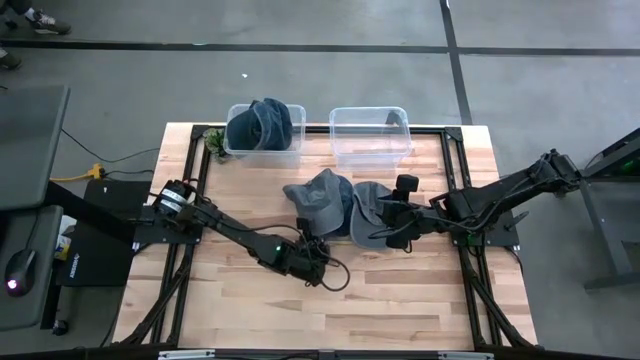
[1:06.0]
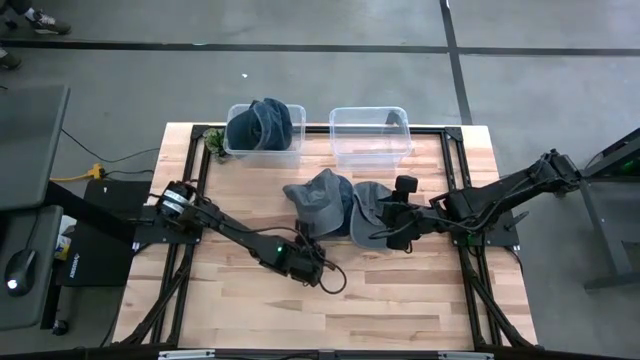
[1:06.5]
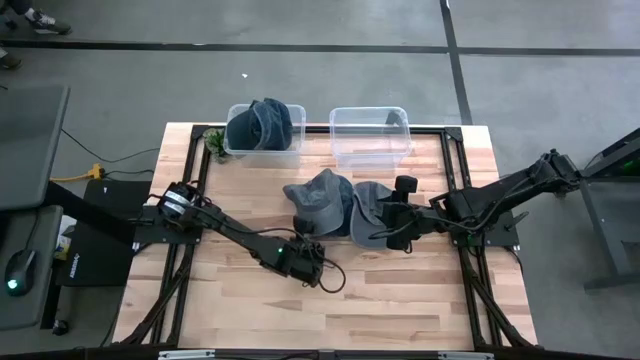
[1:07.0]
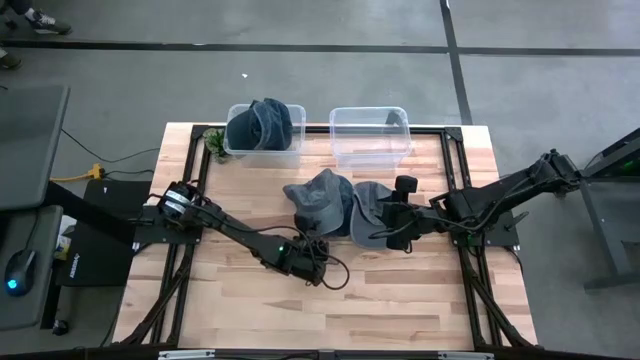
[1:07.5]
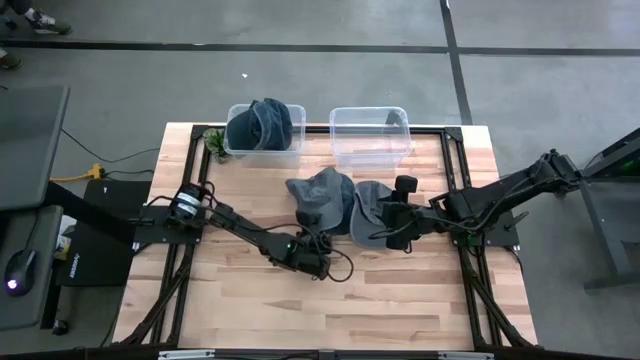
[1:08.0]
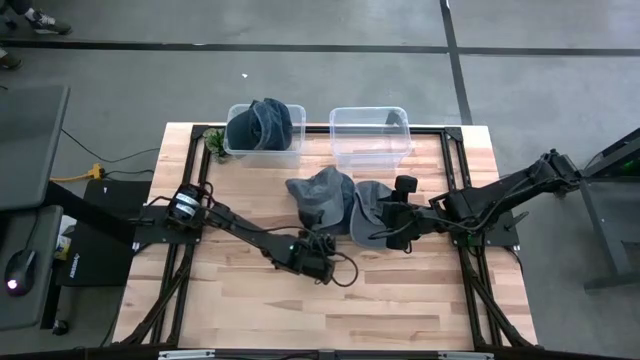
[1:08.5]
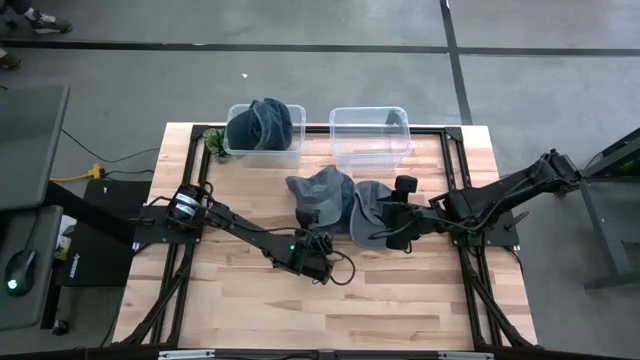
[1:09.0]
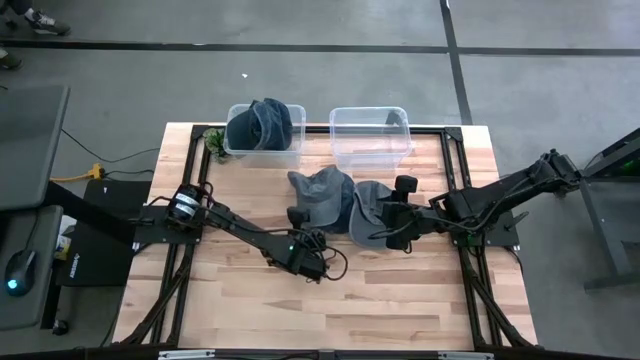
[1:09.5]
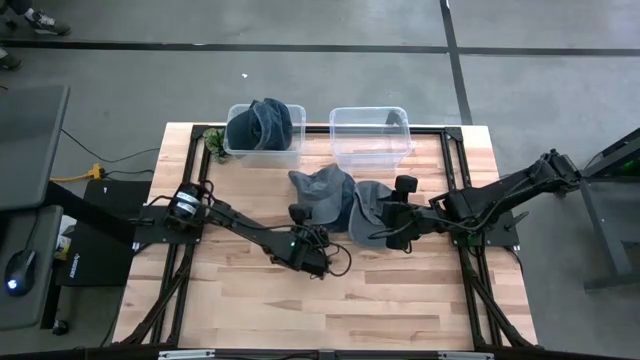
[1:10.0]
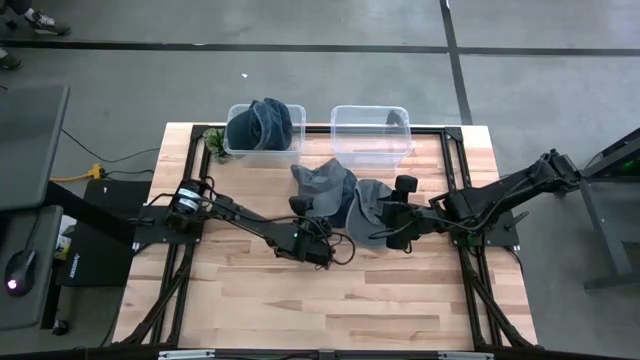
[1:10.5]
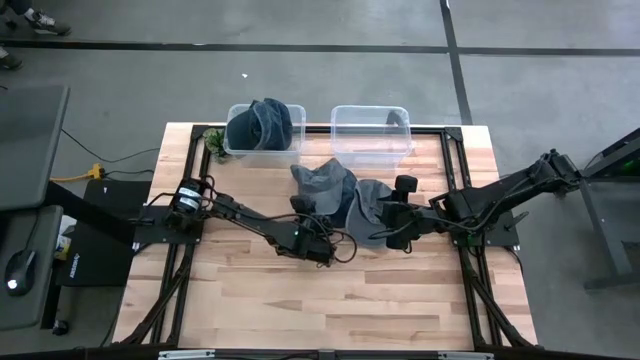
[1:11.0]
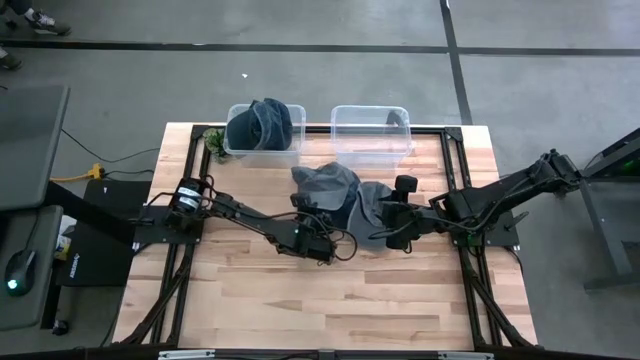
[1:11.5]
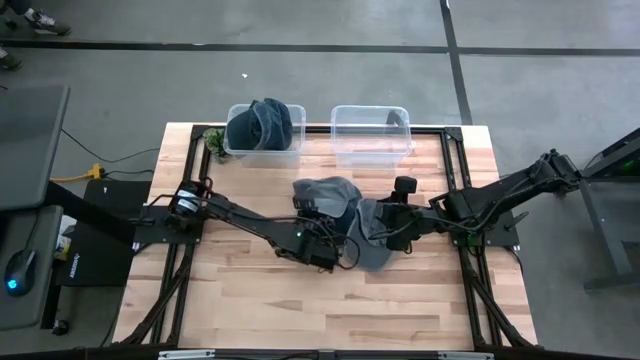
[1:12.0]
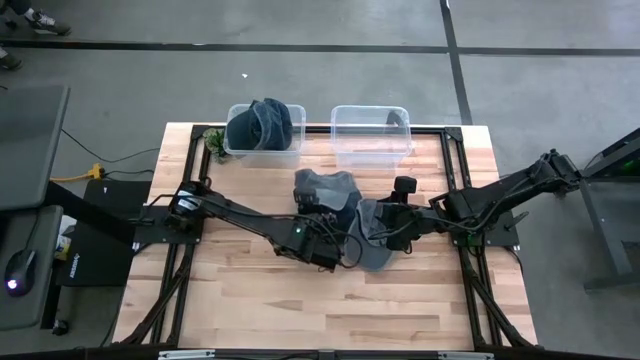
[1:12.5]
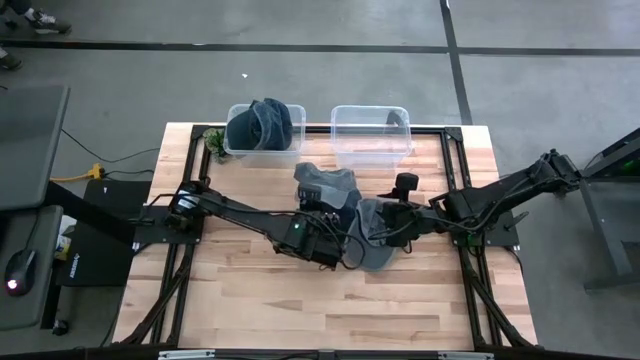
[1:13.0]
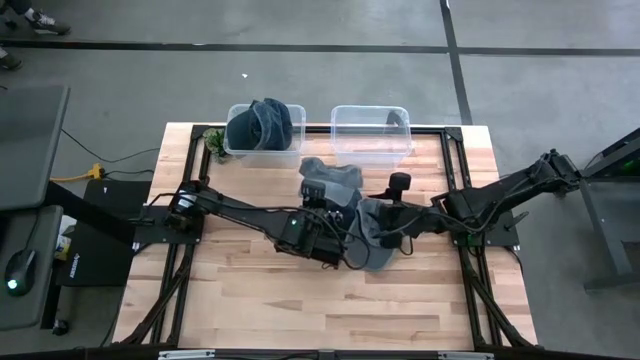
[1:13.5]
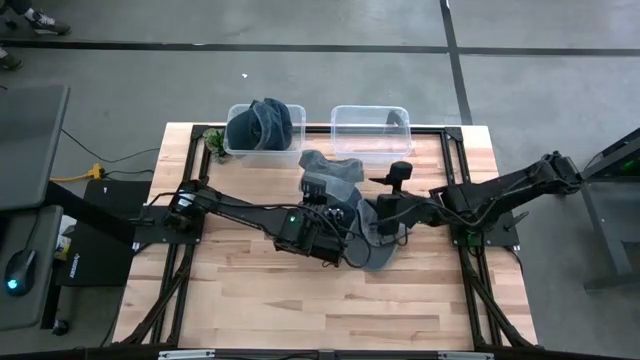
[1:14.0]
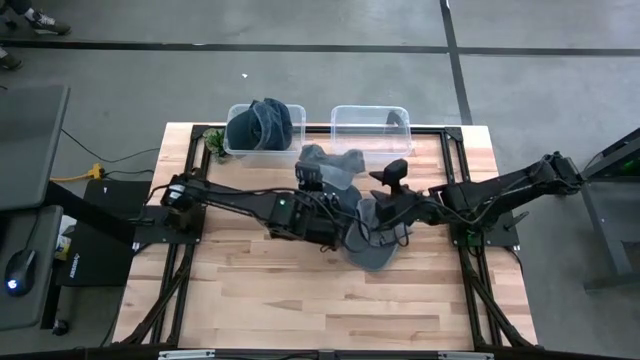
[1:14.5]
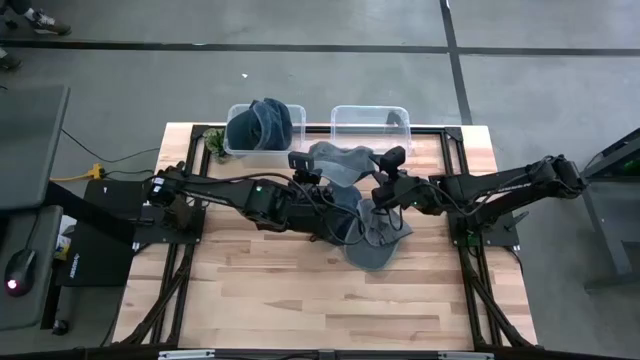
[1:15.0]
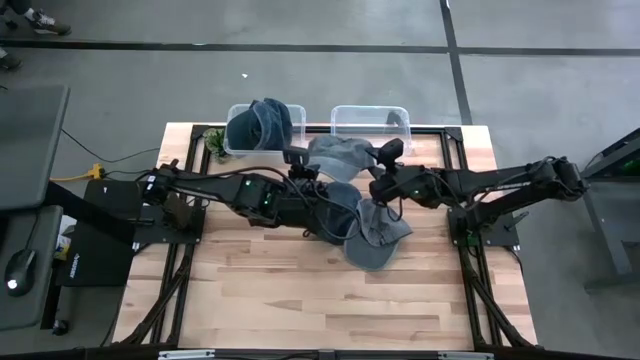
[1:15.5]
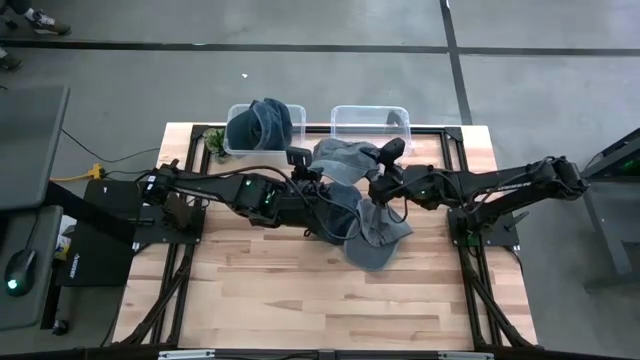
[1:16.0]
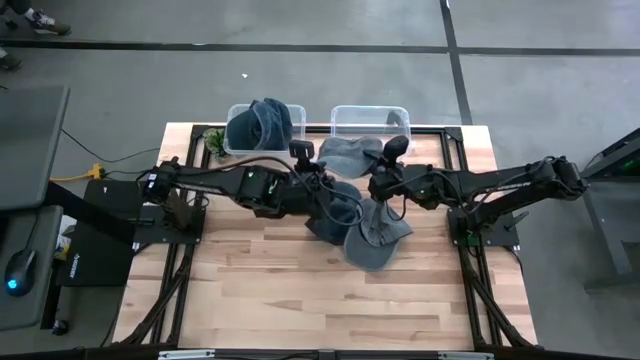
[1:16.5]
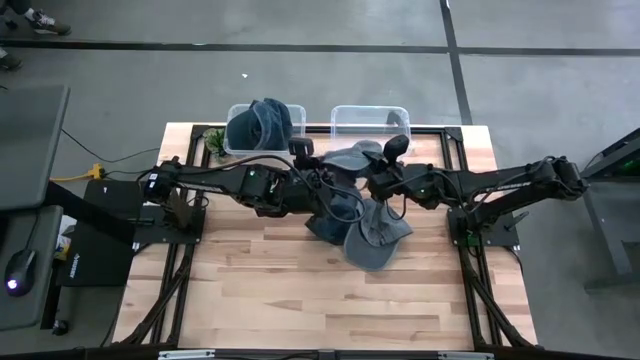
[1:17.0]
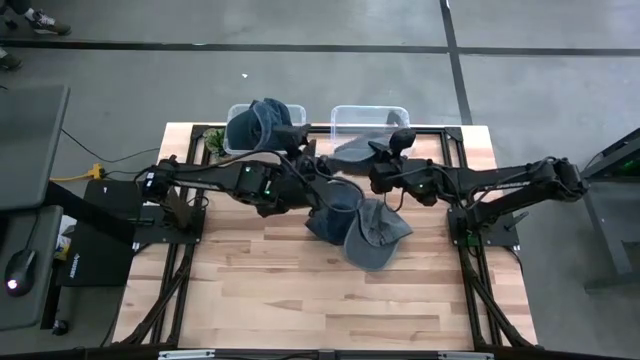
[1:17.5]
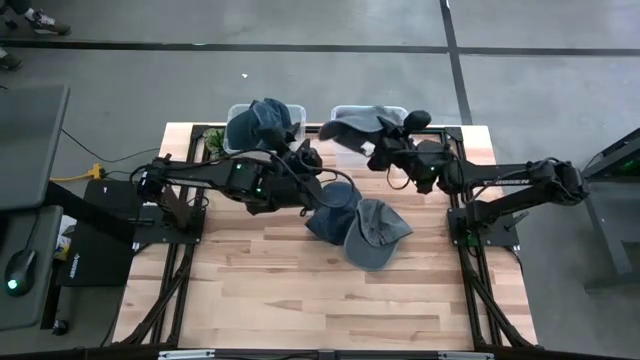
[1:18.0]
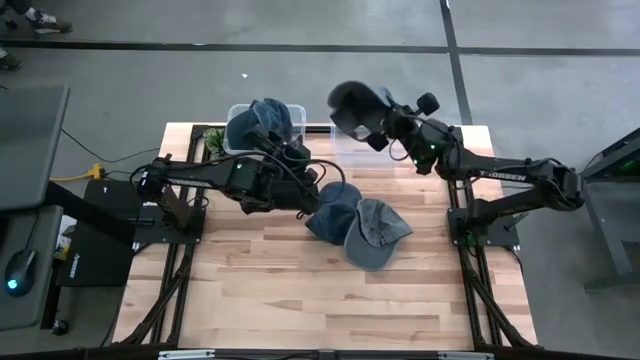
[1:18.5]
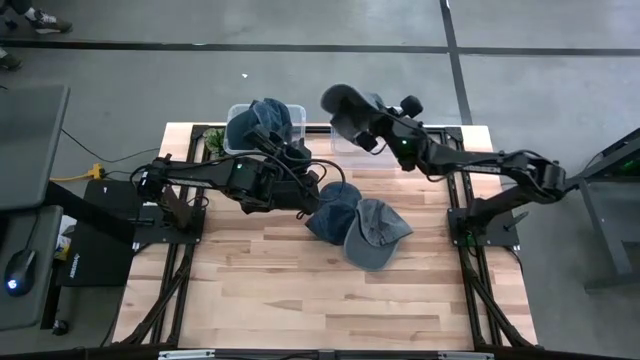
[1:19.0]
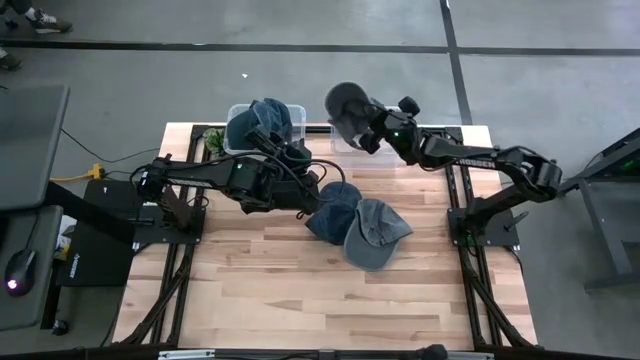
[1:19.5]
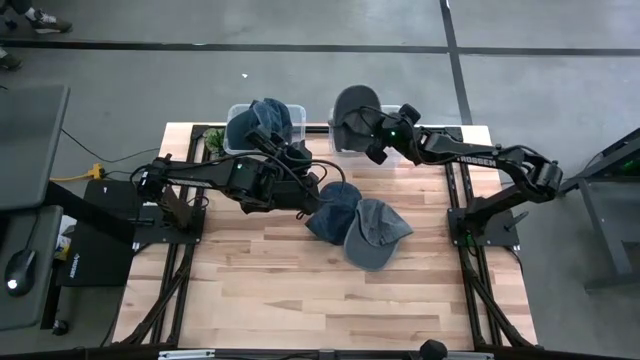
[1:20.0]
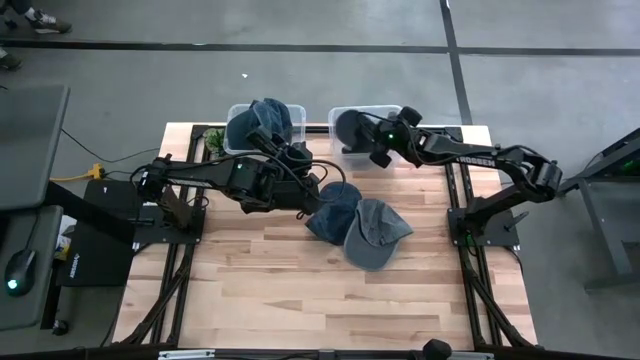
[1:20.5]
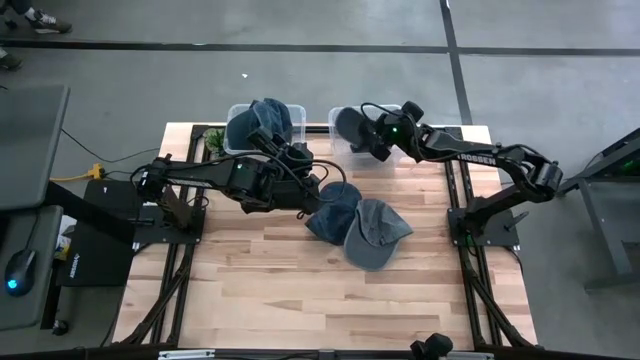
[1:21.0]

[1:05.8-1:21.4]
Task: Pick & Place hat
Put the left top gray cap into the right transparent bin

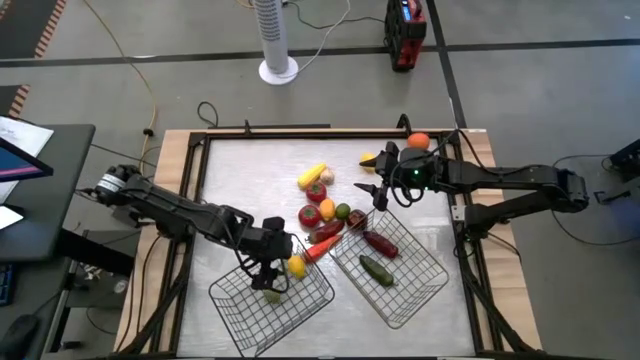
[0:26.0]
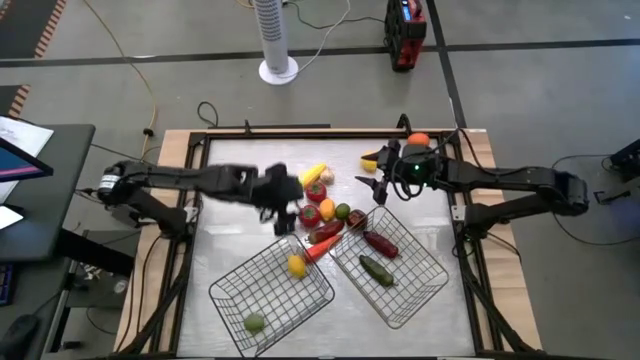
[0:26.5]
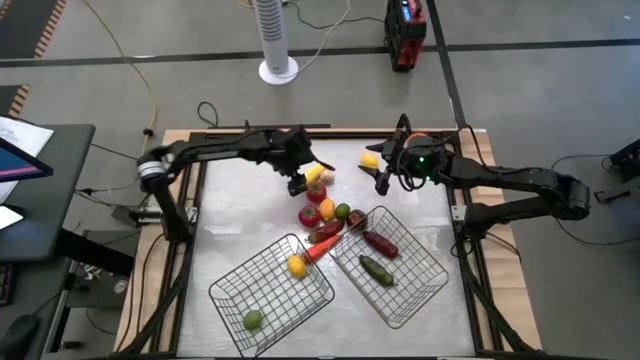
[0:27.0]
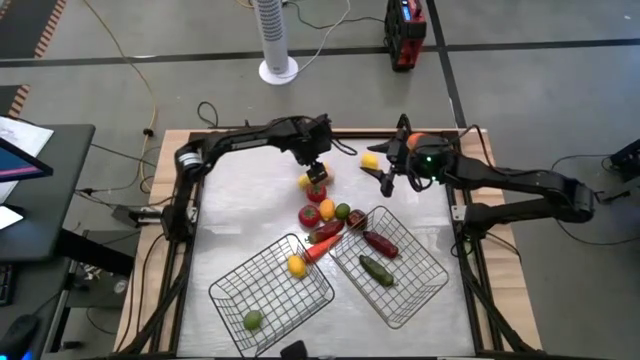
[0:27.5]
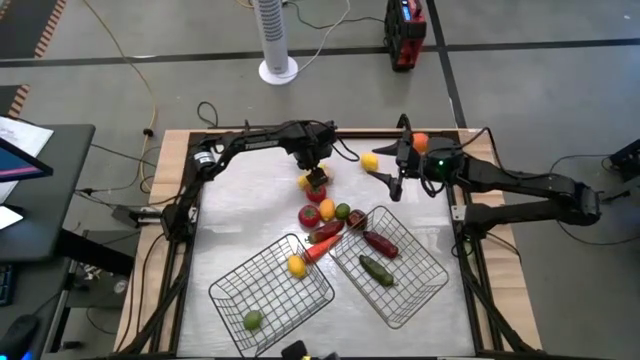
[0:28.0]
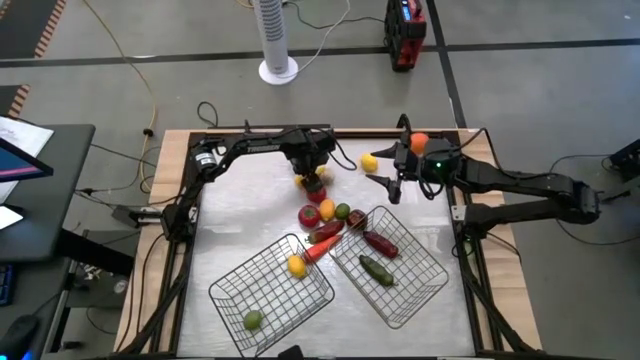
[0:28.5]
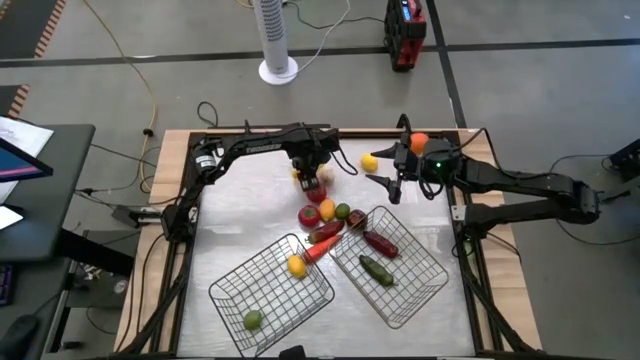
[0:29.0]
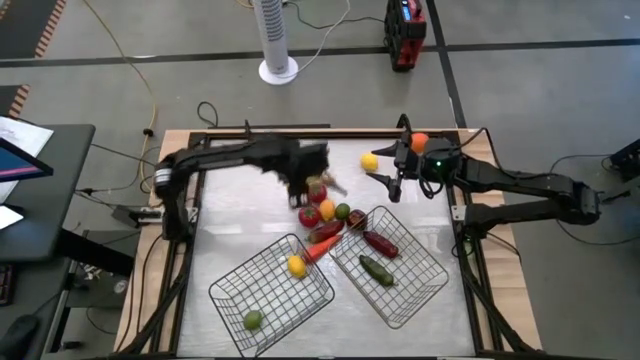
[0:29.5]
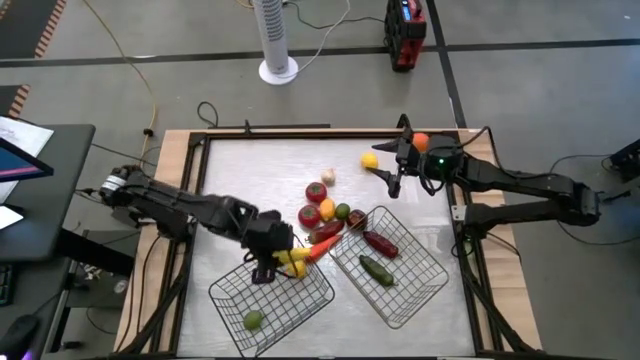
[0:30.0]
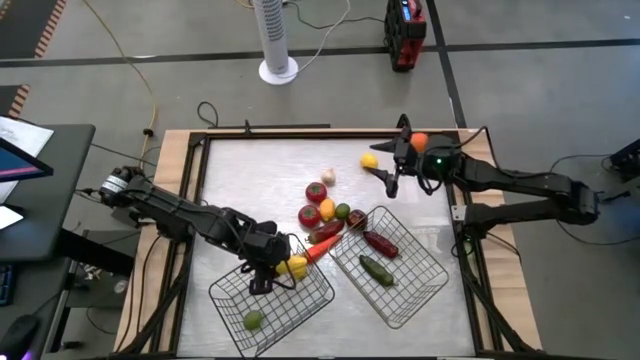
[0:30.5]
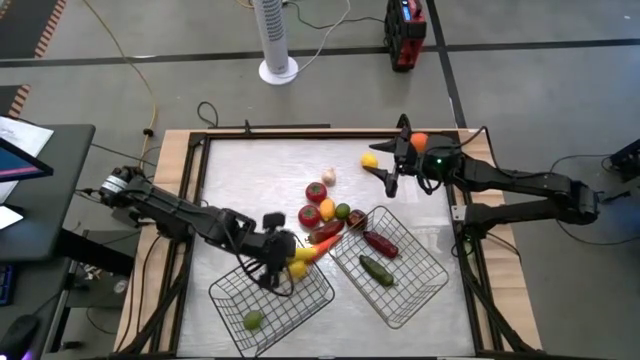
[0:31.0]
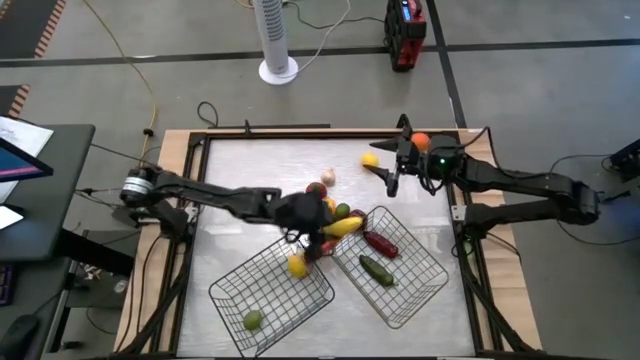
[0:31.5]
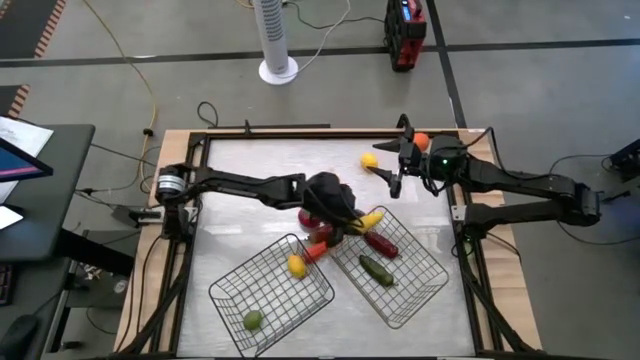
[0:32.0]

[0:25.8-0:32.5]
Task: Sort produce into baskets
Put the yellow corn into the gold wire basket
